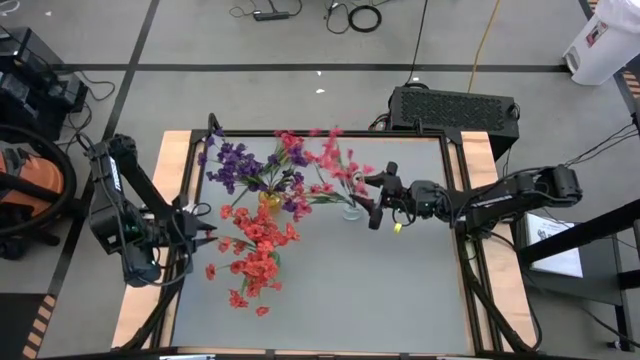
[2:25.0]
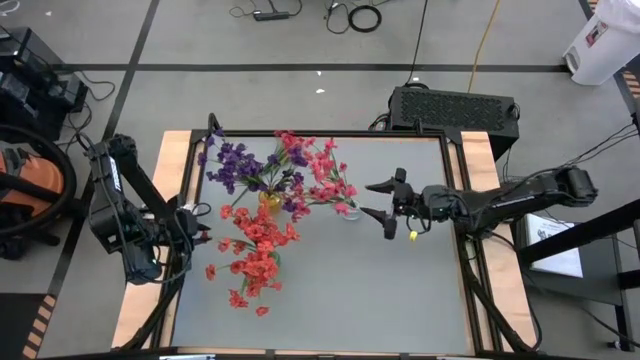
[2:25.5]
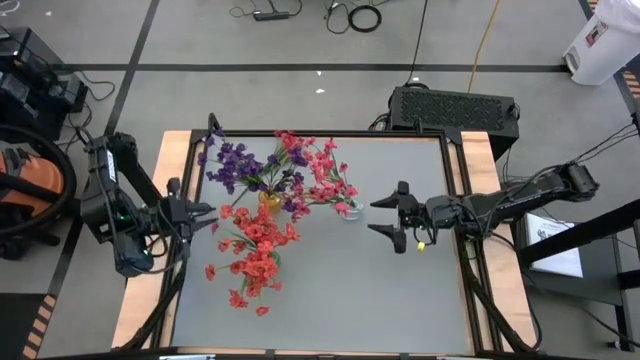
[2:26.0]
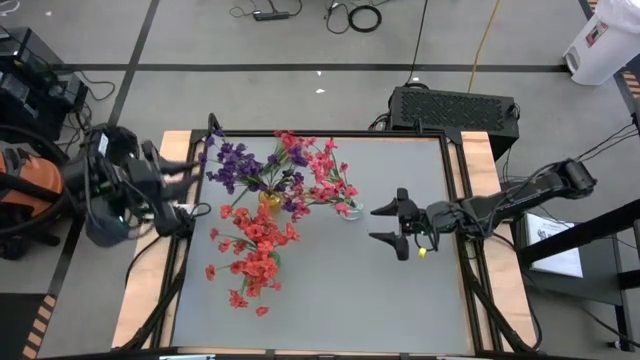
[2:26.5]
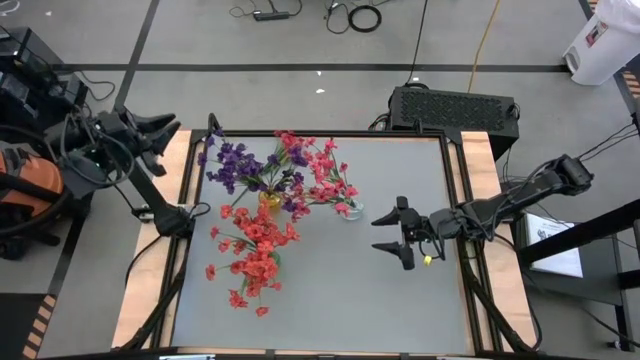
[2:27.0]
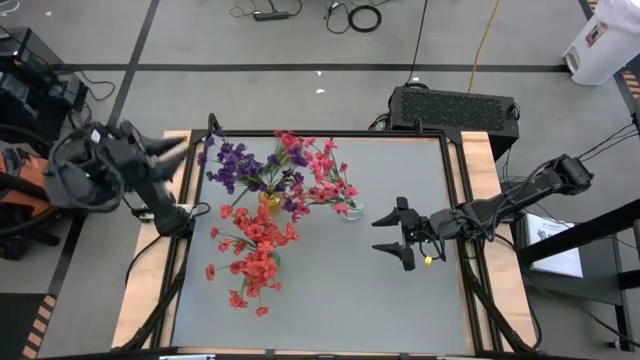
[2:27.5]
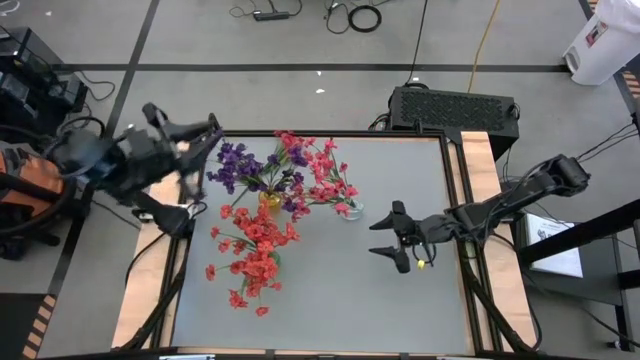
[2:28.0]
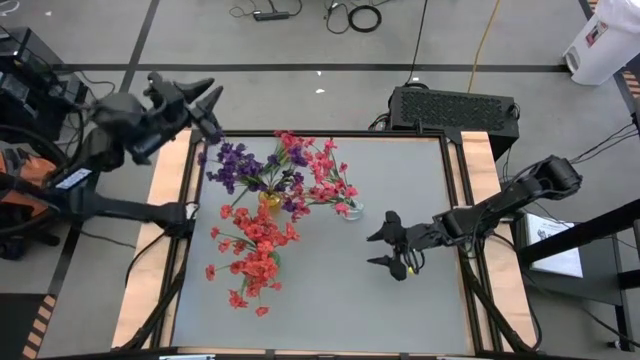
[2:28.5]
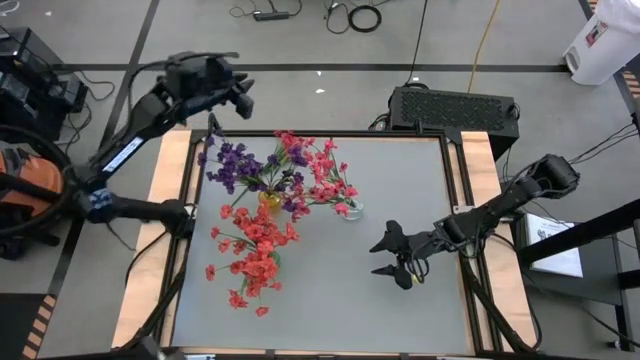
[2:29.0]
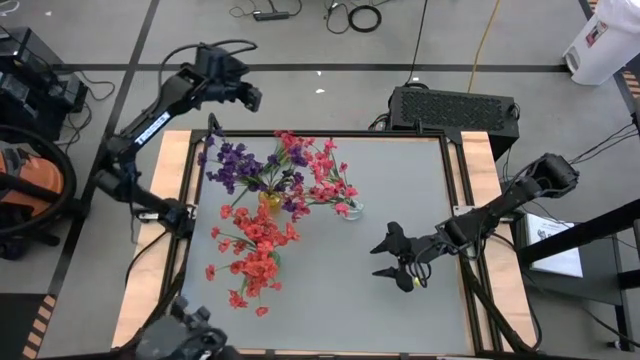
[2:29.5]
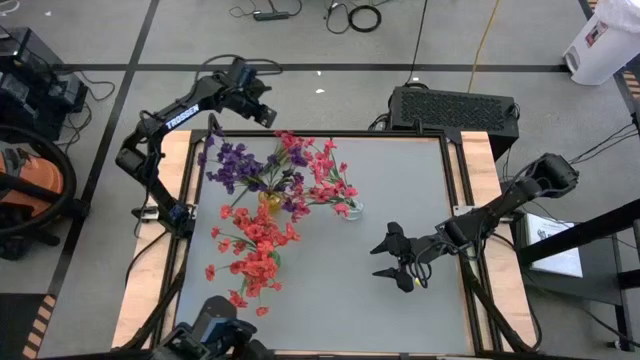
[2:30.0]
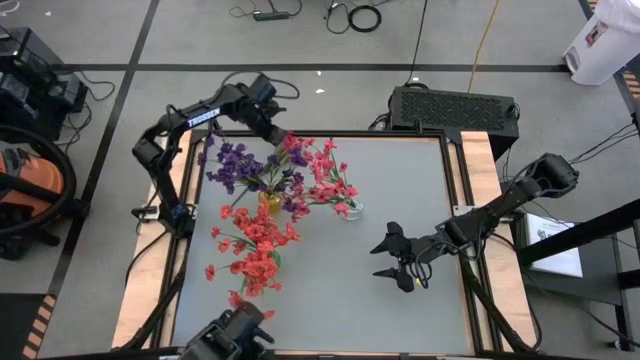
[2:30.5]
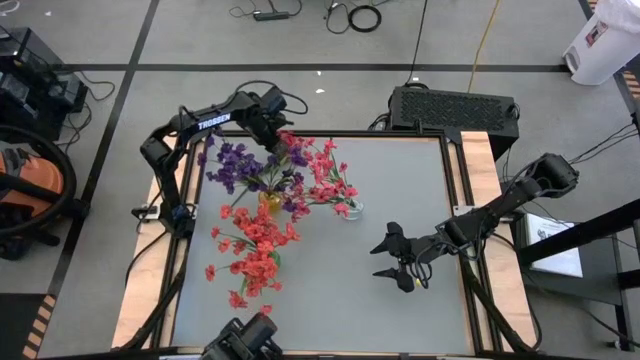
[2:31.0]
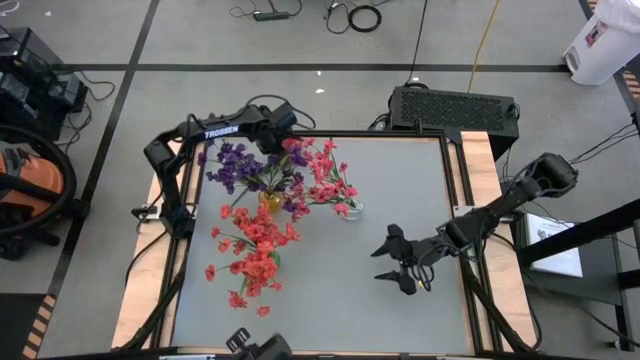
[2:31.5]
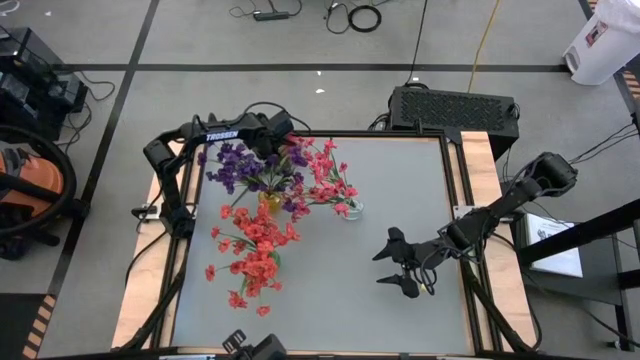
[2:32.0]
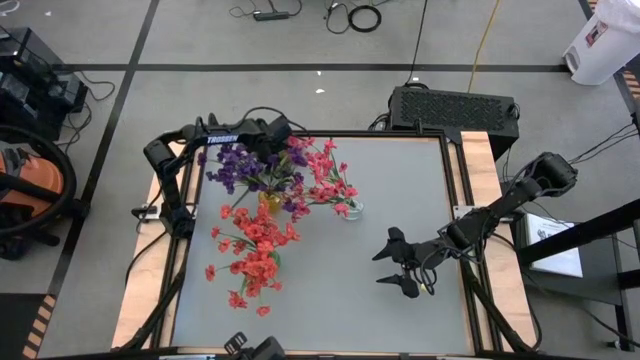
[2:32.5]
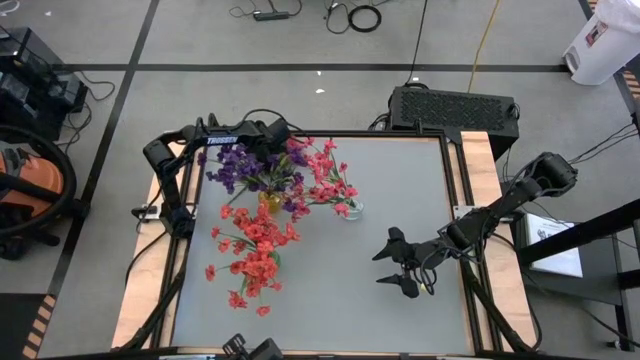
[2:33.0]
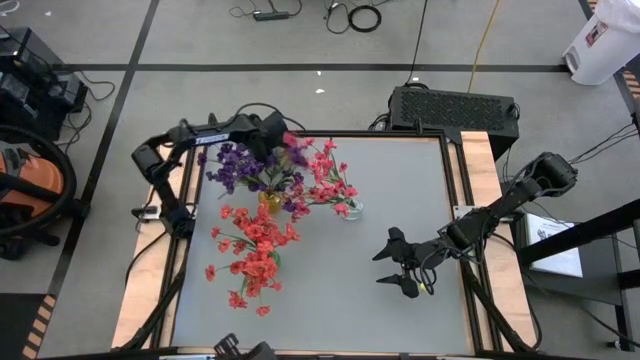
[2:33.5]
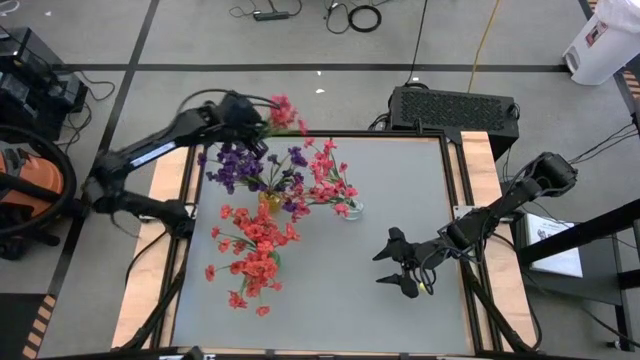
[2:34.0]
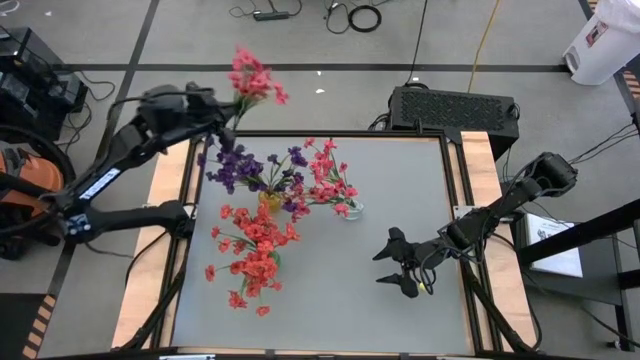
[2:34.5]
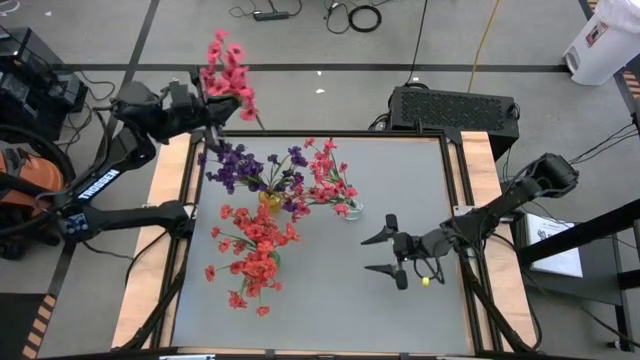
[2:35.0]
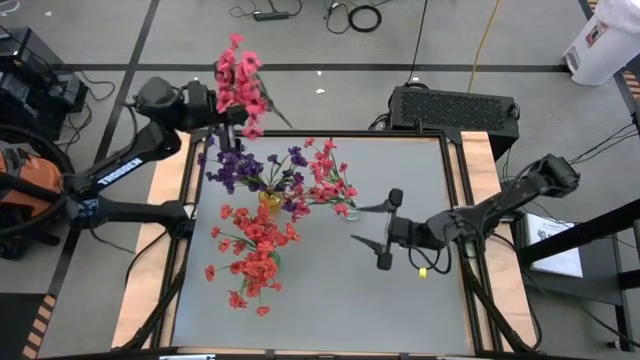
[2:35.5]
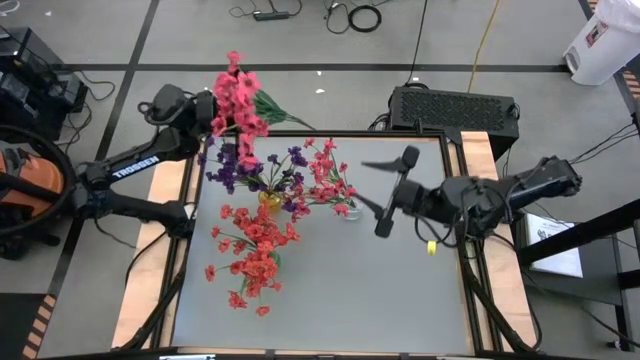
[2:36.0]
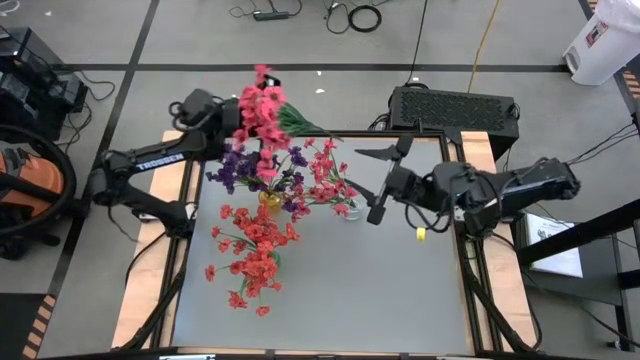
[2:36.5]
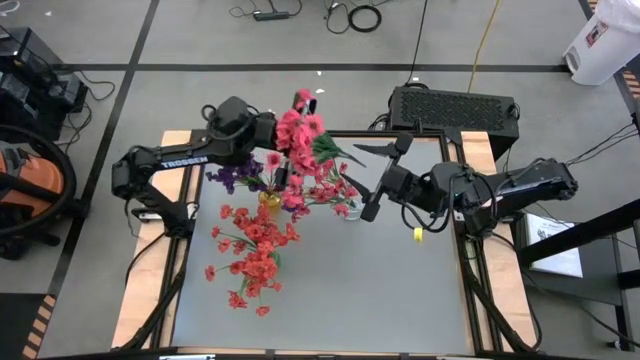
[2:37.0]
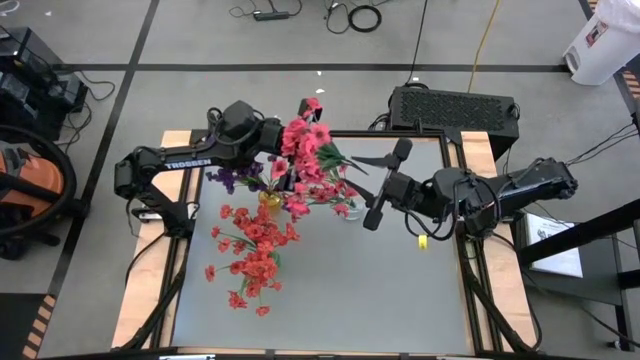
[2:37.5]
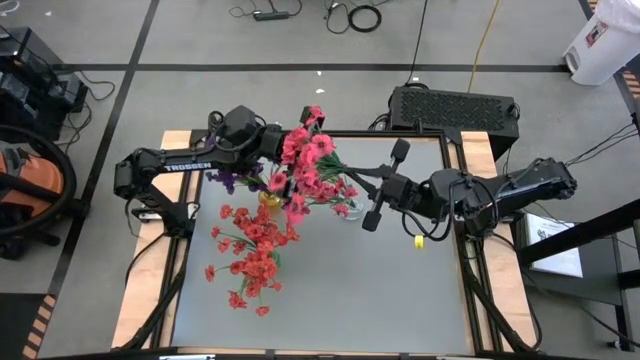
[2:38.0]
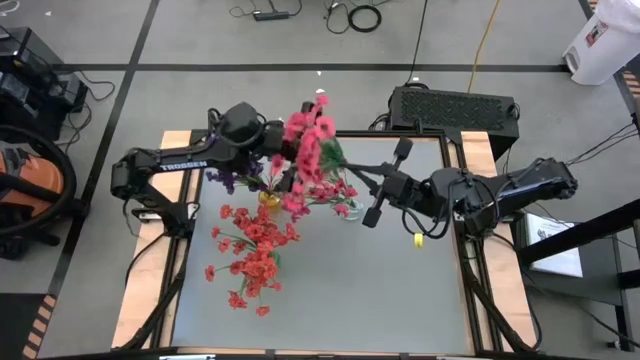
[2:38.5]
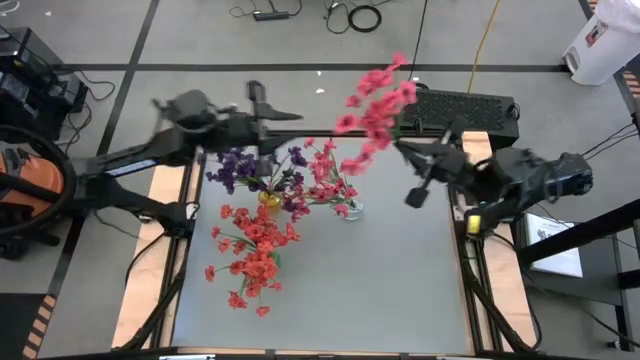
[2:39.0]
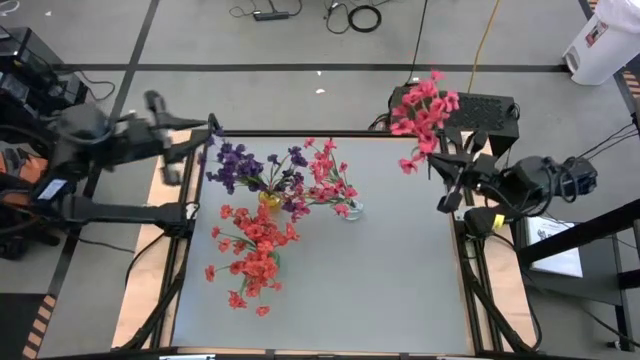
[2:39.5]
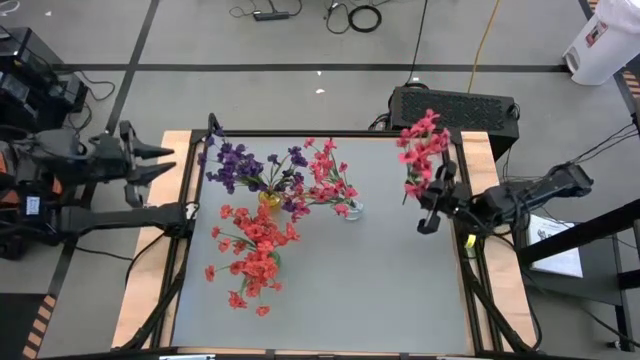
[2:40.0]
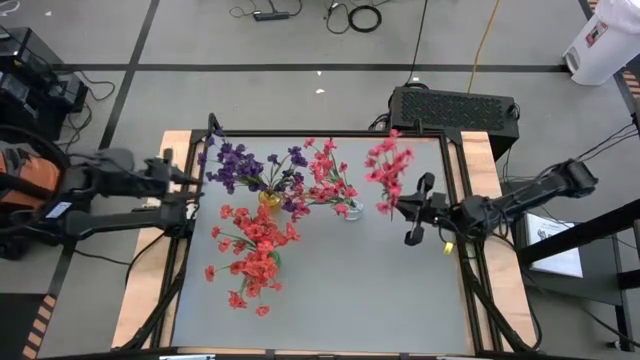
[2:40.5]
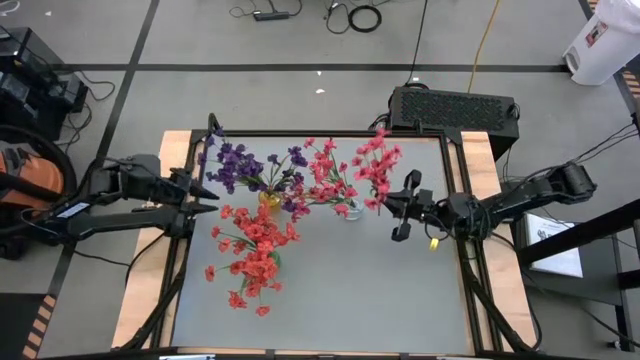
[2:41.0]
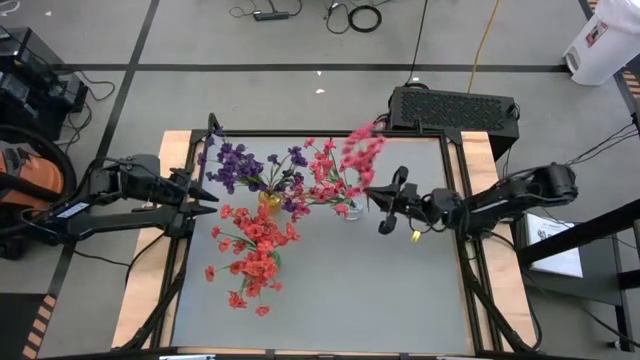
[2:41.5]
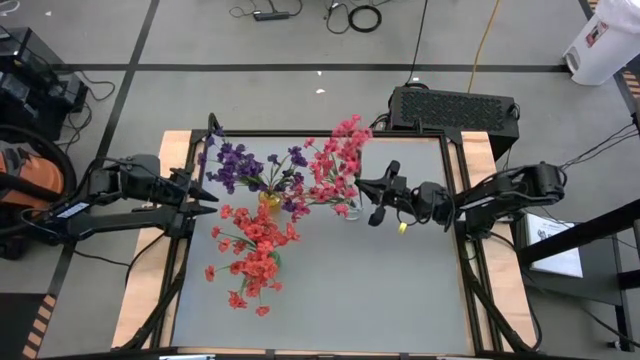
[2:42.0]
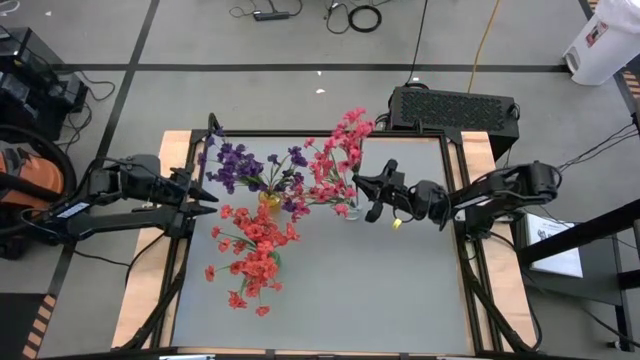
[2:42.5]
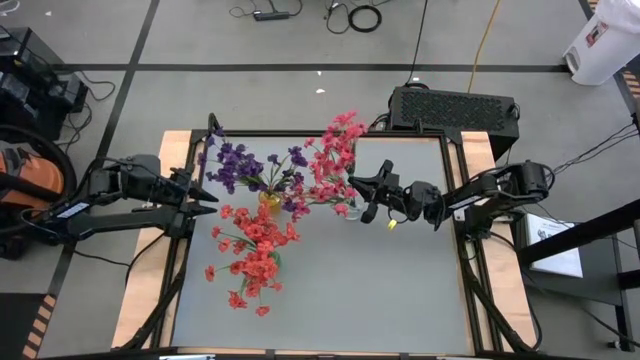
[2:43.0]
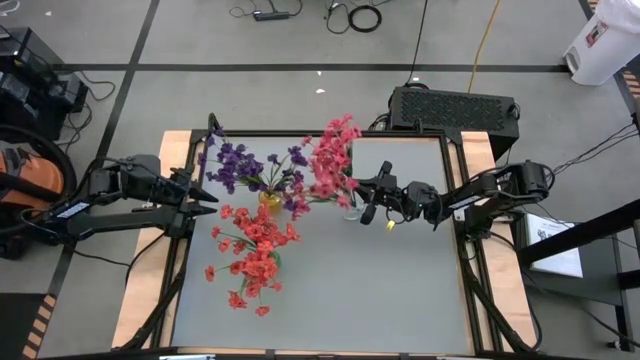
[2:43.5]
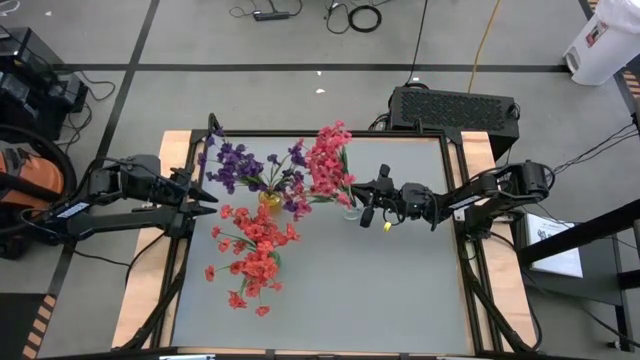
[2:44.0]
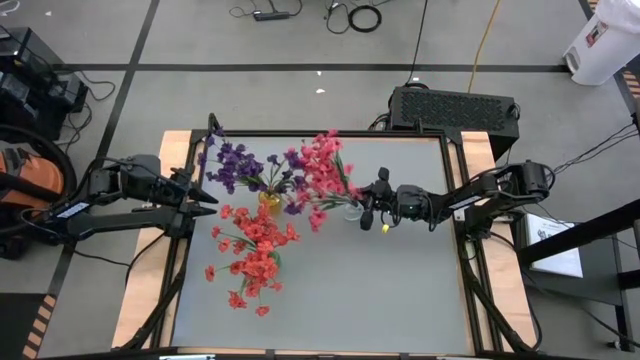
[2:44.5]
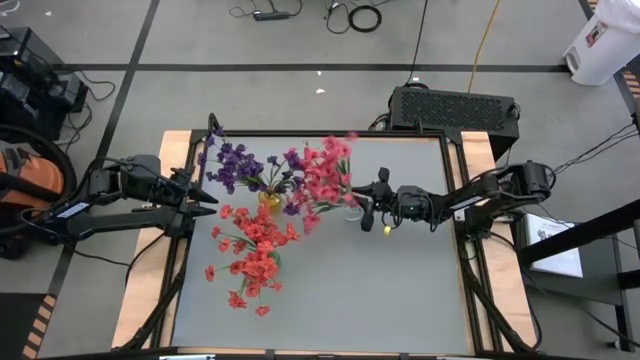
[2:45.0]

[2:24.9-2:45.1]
Task: Sort flowers into vase by color
Put the pink flowers into the green vase

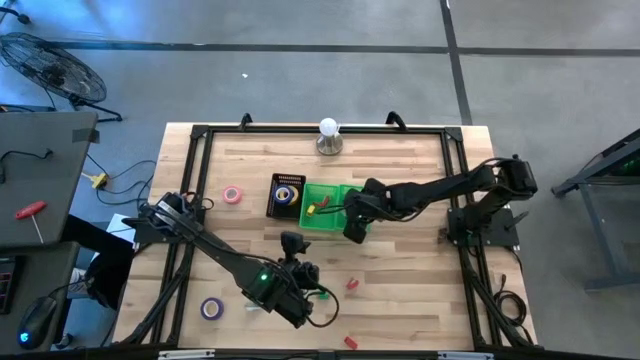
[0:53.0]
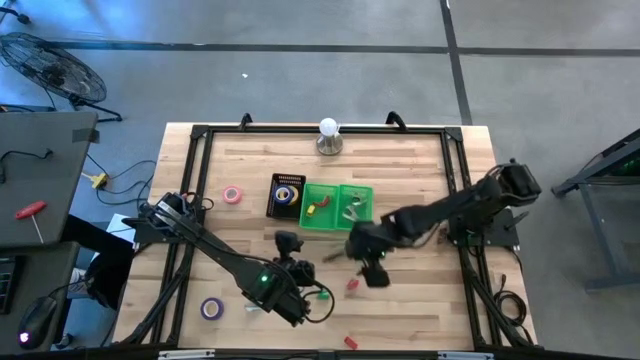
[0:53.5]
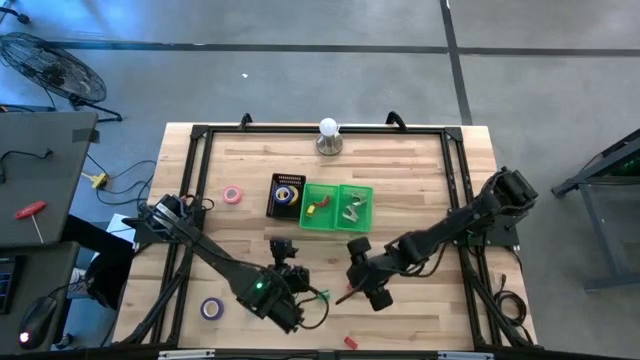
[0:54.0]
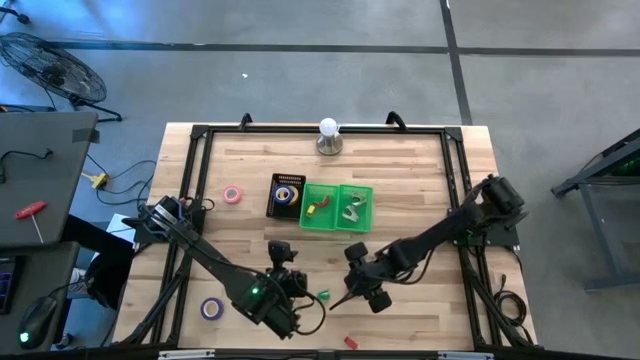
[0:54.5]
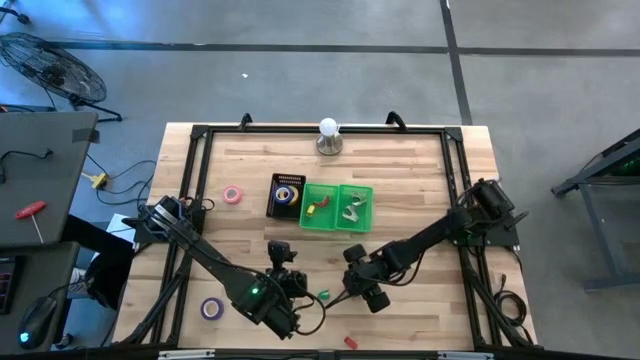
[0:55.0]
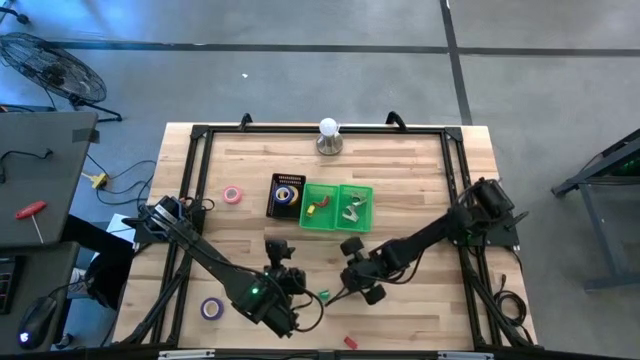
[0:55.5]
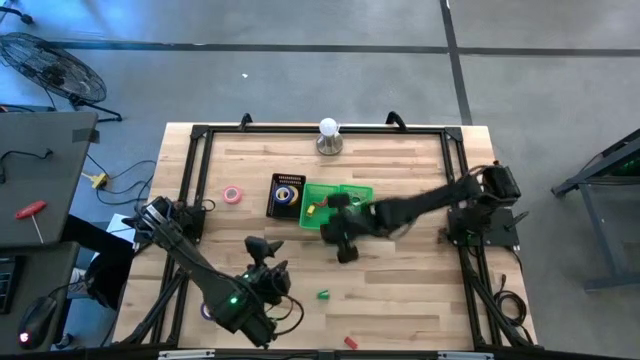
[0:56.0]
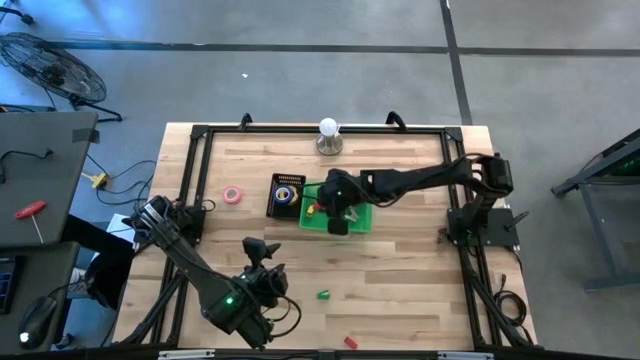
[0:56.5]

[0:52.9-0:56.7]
Task: Pick and place Stapler, Stapler remover, tape
Put the top red stapler into the left green bin
